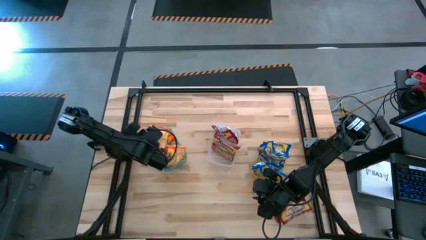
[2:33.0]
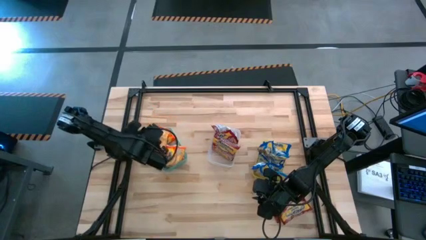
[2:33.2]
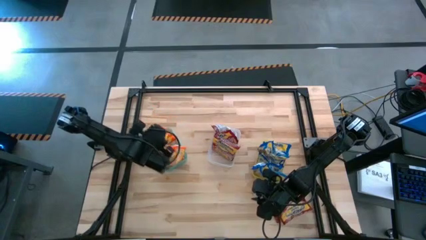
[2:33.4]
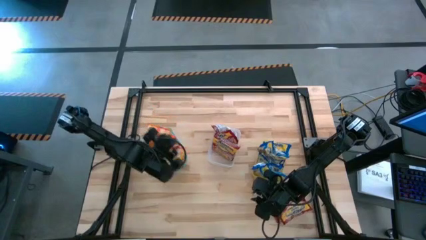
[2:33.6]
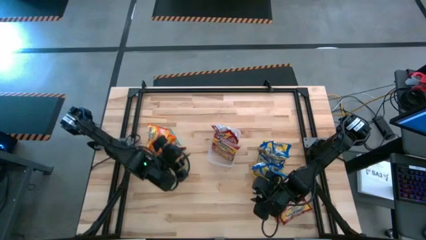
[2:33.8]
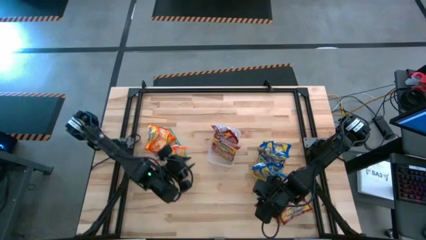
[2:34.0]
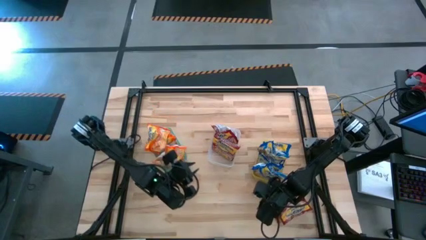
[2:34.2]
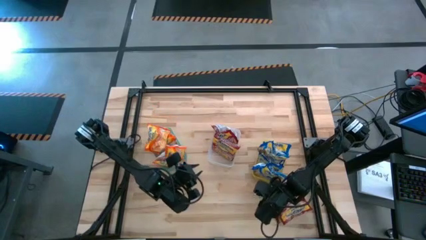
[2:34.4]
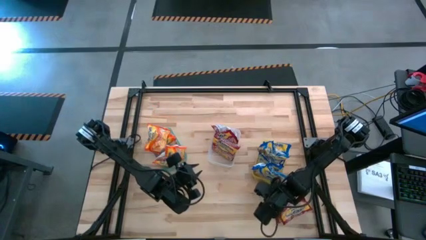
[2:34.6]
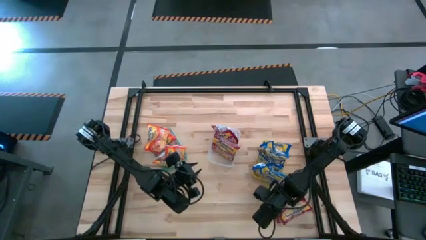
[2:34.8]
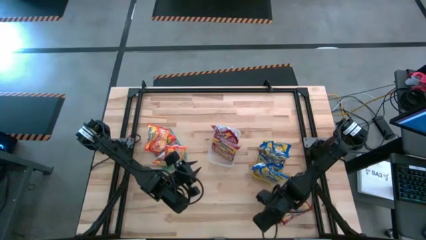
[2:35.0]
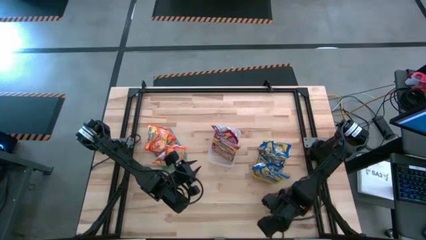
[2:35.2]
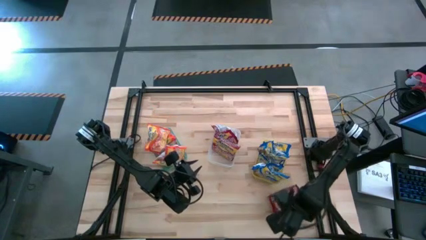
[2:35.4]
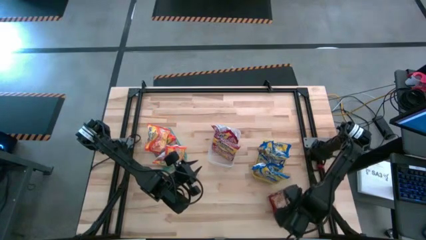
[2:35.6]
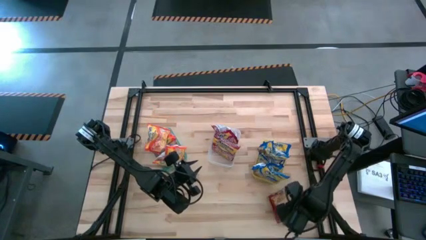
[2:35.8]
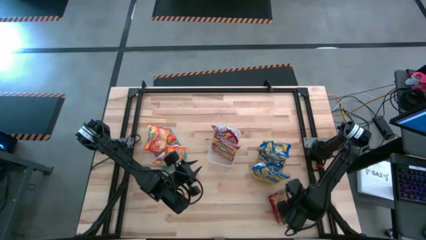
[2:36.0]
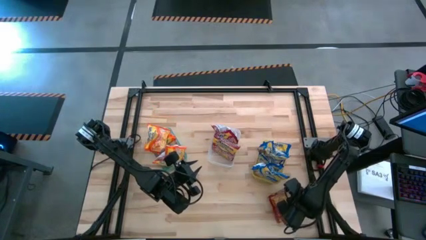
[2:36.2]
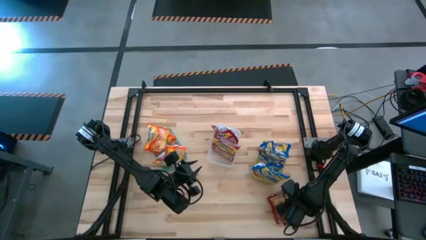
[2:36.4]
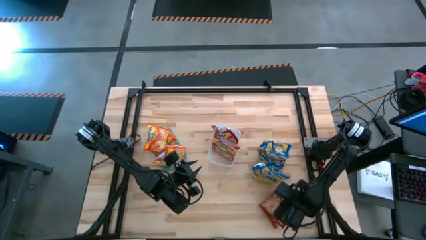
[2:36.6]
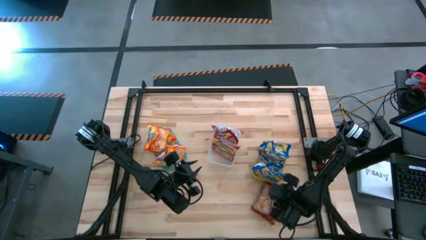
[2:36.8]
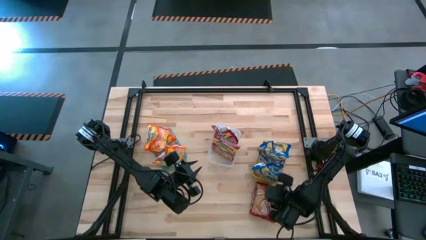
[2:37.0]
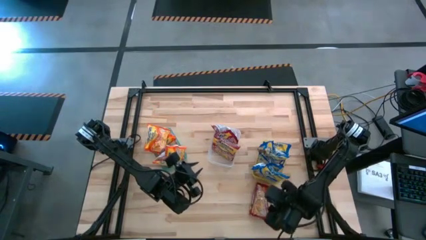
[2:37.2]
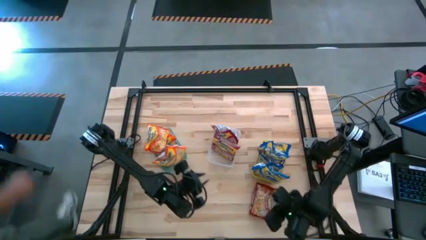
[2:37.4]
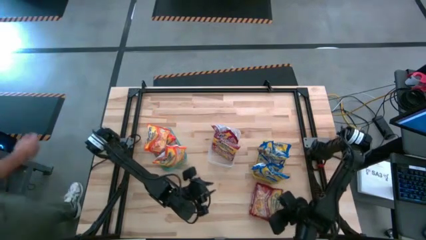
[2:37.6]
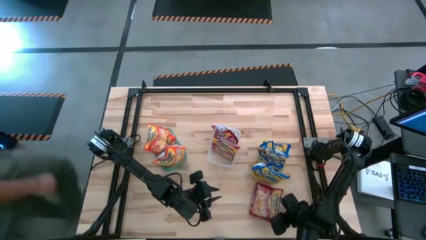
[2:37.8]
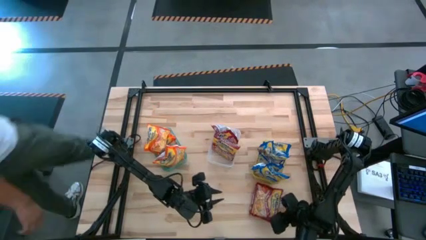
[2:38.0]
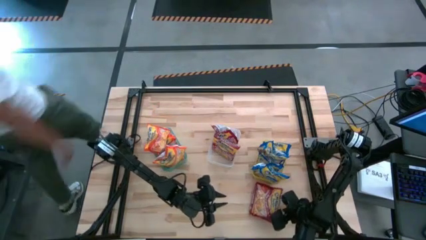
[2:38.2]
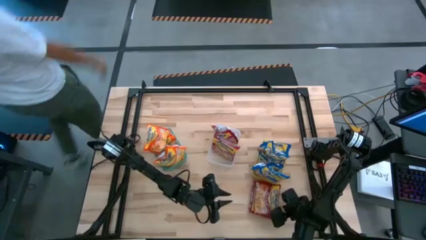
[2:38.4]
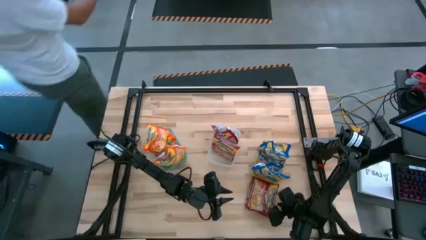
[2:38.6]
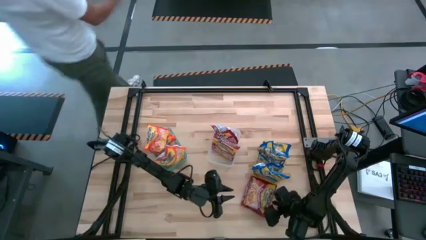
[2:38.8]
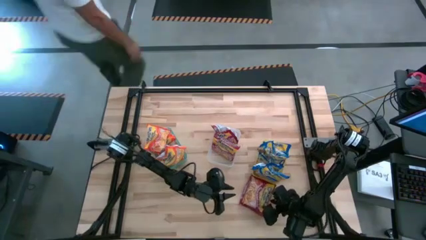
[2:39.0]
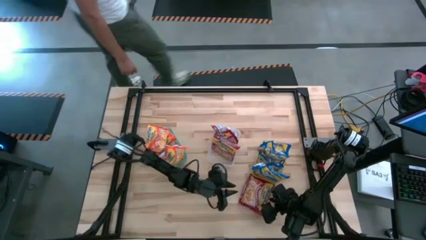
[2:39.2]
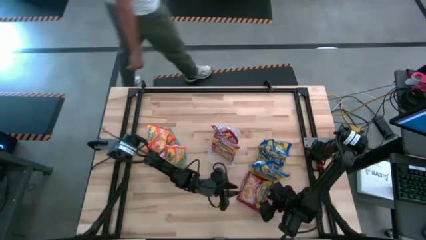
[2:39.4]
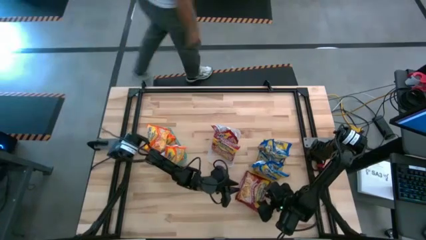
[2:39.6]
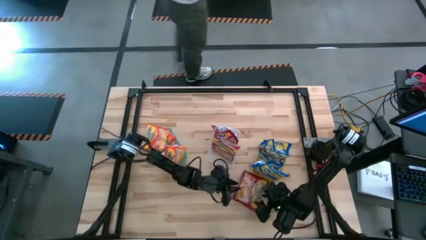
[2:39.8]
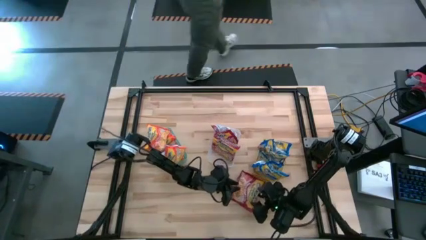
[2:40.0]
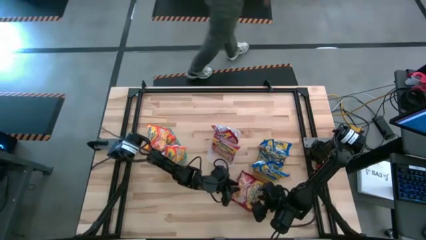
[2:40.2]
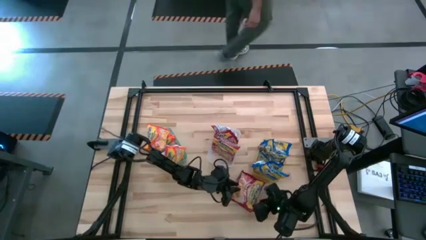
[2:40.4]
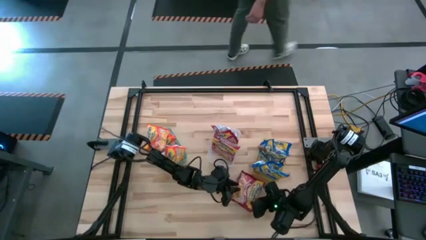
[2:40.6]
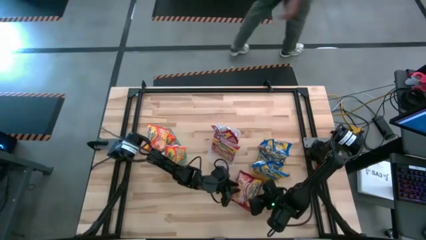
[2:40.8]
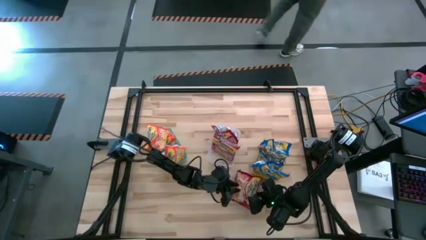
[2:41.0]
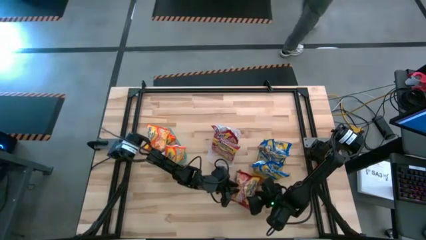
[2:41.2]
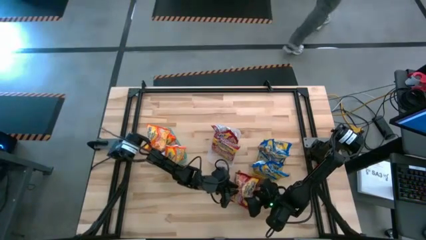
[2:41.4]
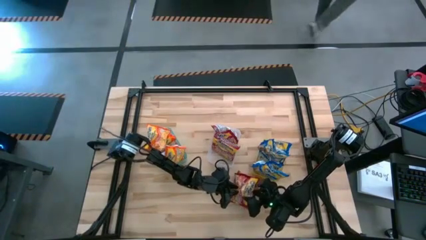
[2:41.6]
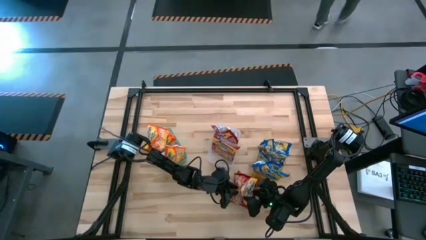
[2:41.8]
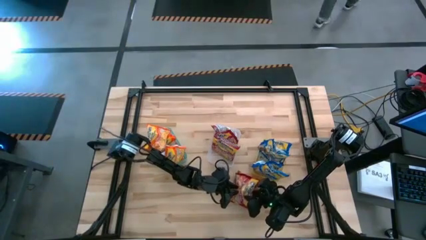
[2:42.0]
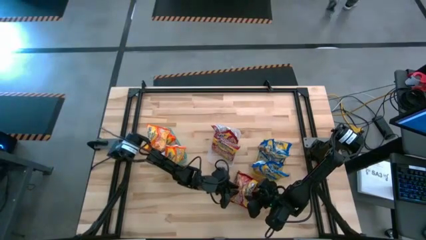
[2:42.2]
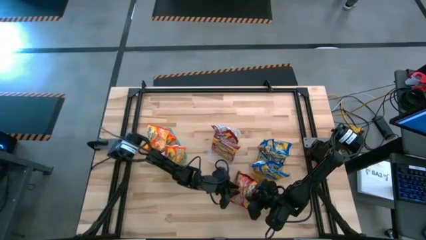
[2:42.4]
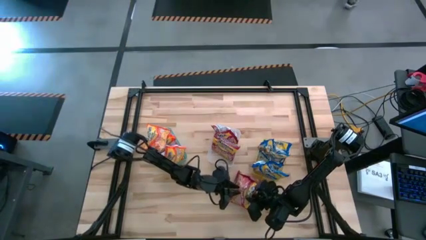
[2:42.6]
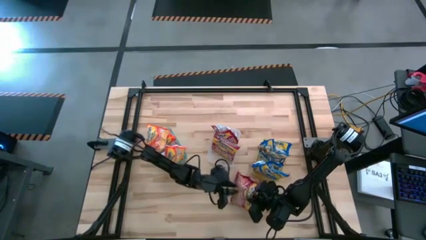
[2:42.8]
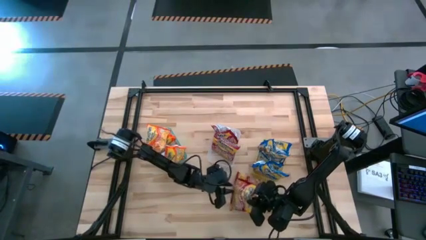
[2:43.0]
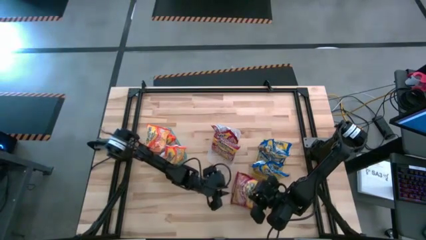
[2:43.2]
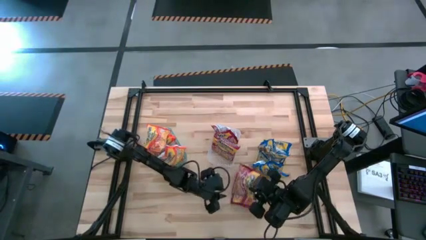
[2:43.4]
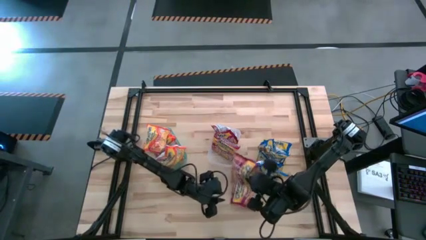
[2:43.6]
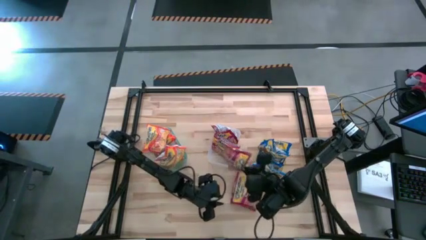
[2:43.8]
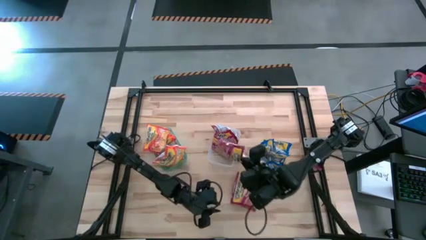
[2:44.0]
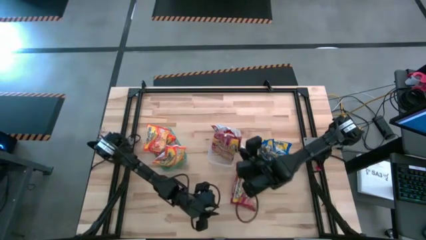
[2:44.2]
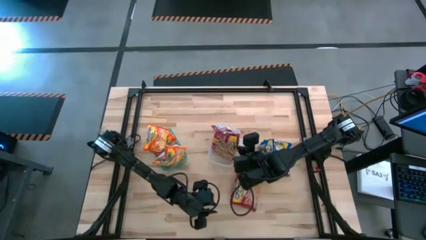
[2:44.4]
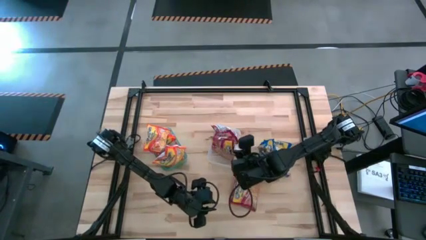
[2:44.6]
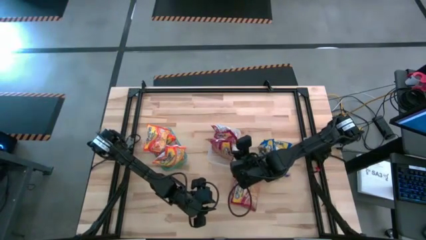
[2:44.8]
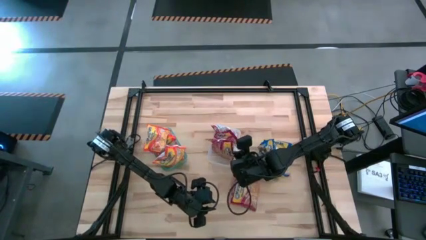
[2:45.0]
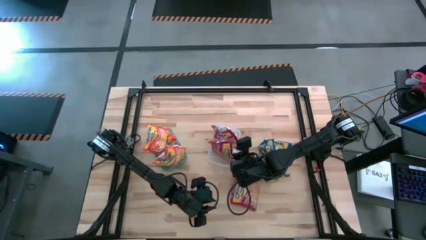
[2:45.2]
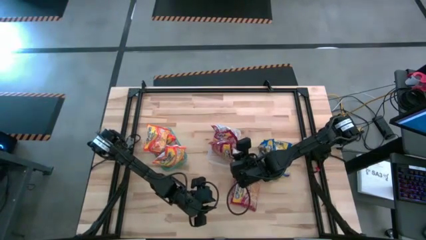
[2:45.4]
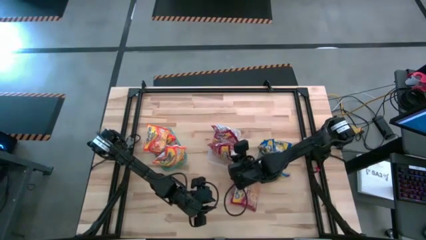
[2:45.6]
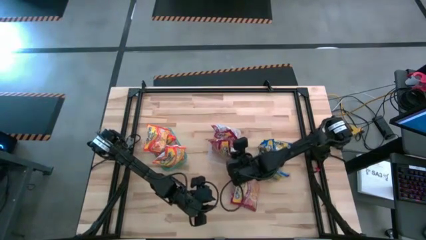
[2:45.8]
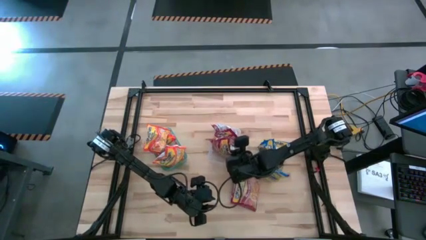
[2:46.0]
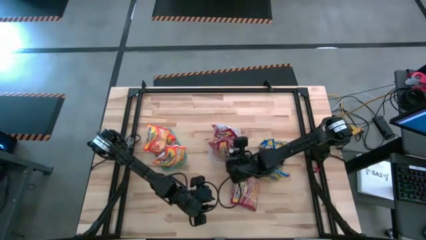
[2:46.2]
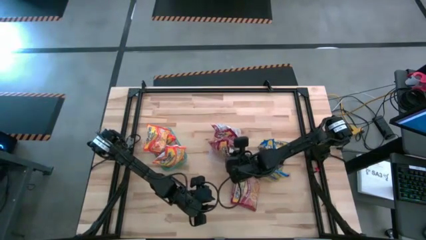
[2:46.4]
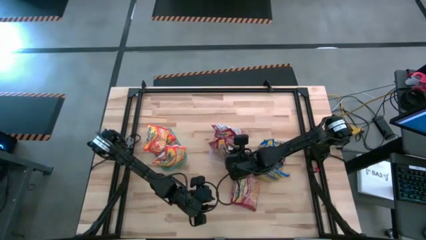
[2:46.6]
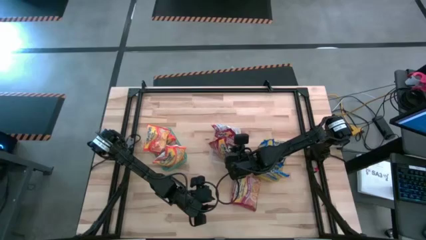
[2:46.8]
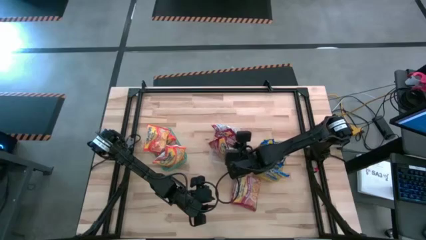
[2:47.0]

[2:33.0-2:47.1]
Task: Sort Maruchan noodles
Put the red noodle pack into the white bin

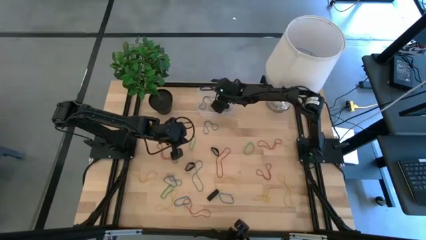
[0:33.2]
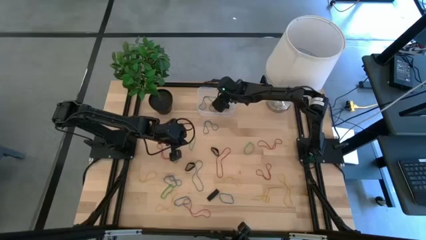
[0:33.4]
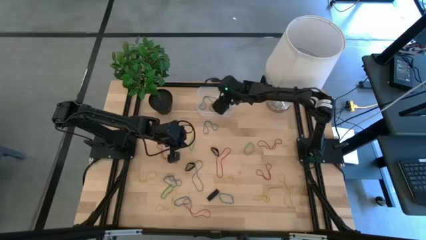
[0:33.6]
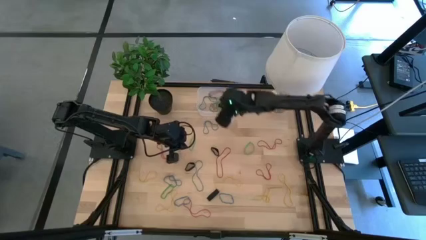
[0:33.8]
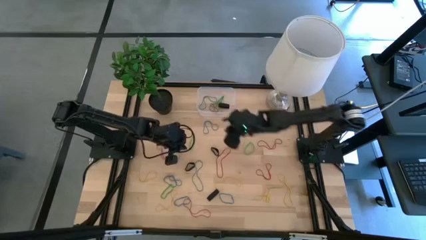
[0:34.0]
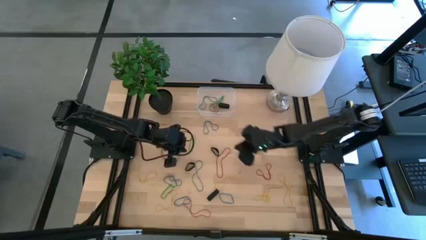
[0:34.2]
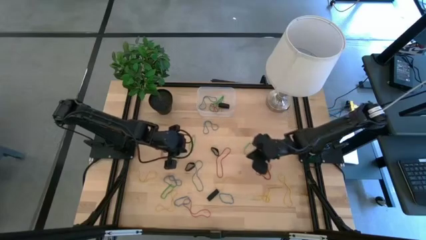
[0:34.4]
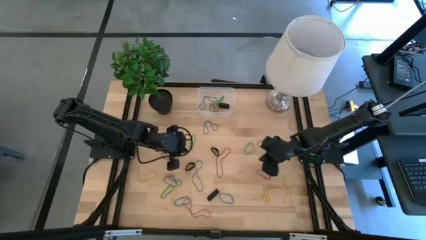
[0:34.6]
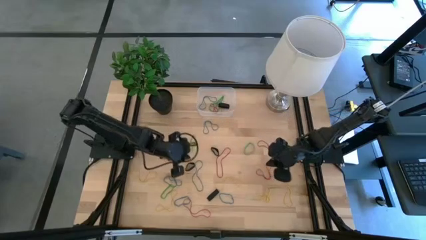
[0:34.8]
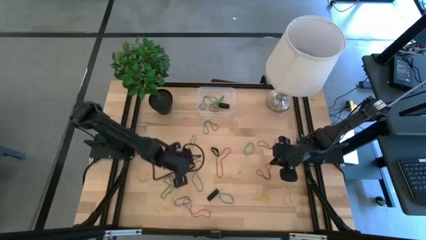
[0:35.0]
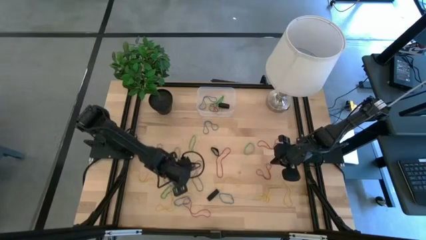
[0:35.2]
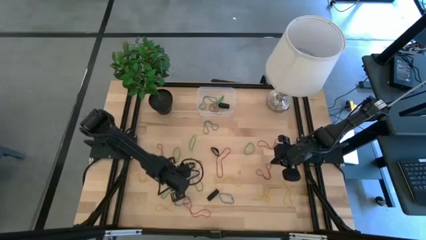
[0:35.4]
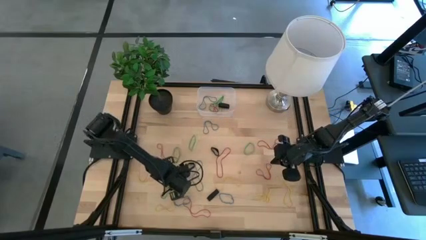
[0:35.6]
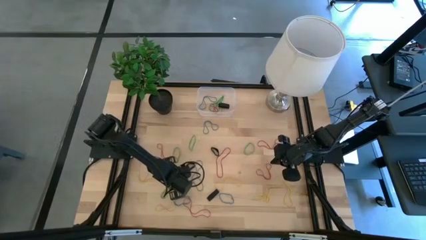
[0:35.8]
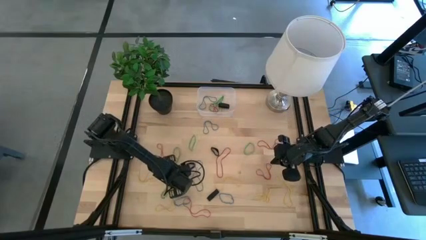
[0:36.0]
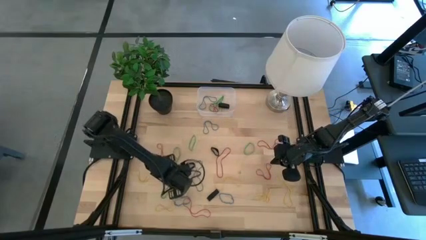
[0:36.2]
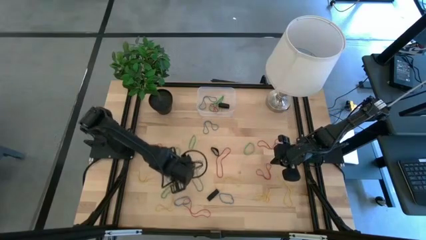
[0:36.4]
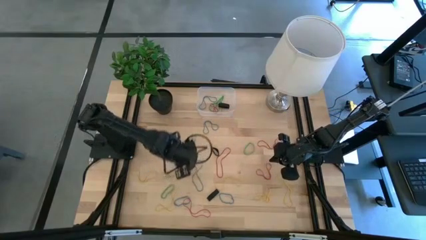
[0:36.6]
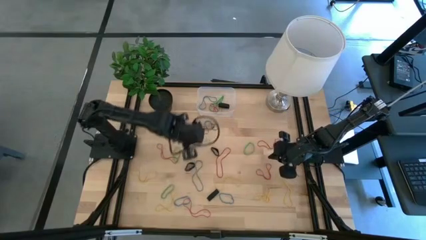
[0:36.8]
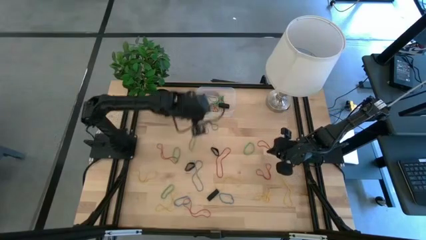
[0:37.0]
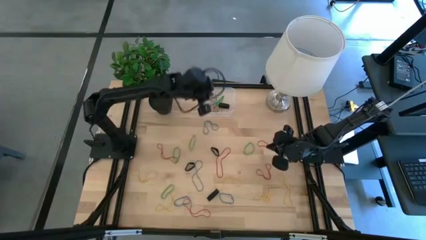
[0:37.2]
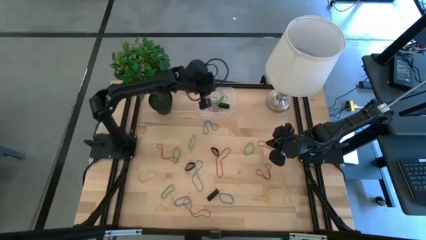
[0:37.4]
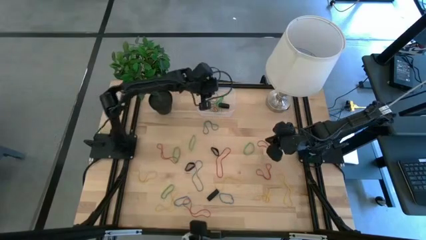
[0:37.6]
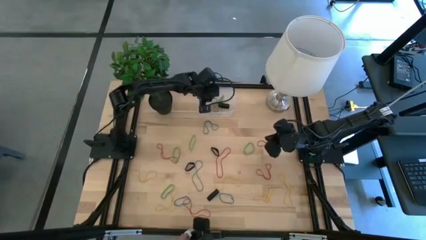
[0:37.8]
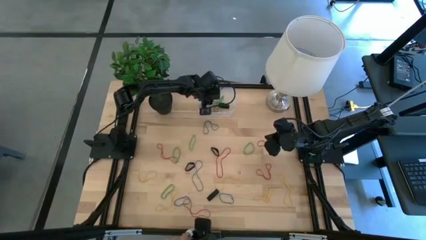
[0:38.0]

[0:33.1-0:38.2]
Task: Pick and place rubber bands into bin
Put the blue rubber band into the transparent bin
